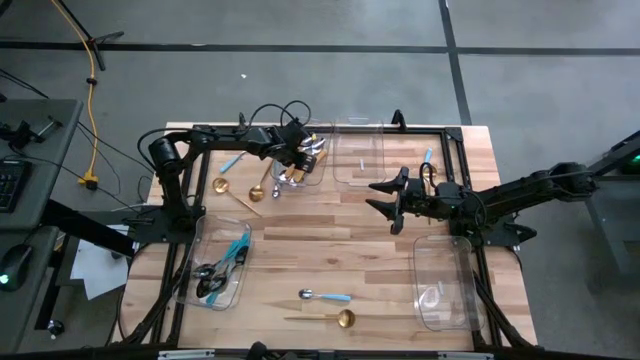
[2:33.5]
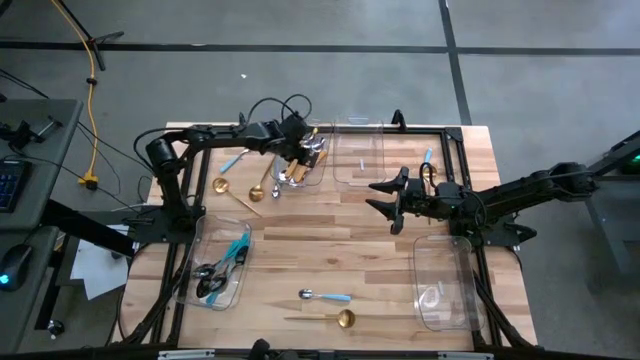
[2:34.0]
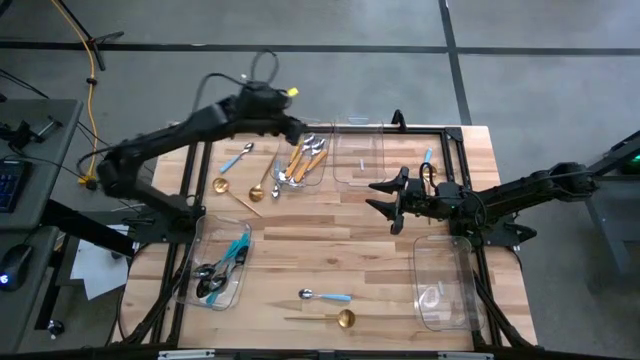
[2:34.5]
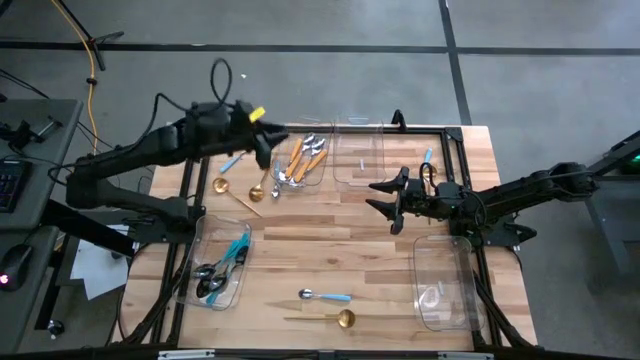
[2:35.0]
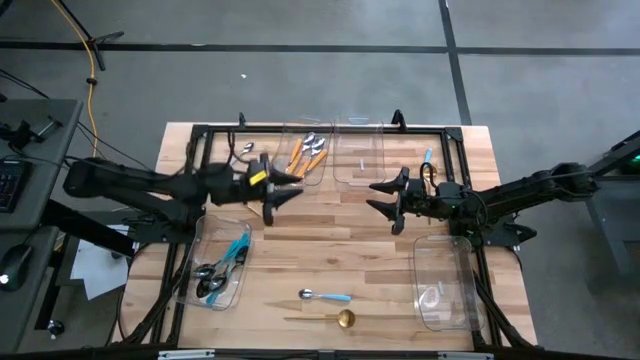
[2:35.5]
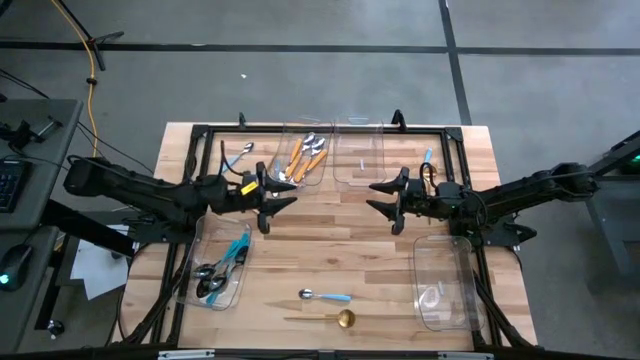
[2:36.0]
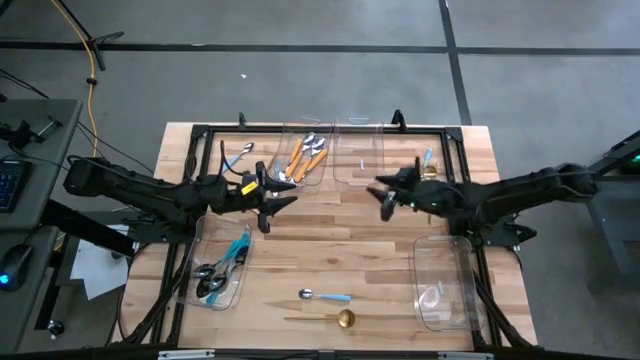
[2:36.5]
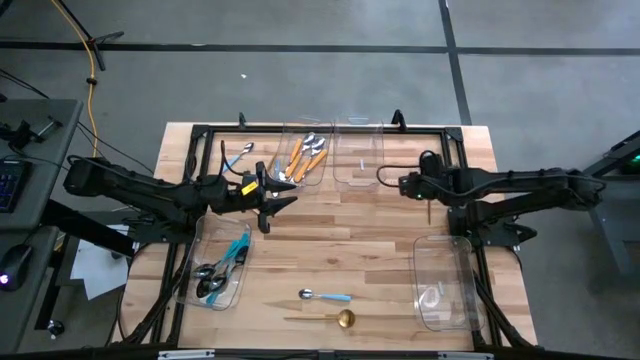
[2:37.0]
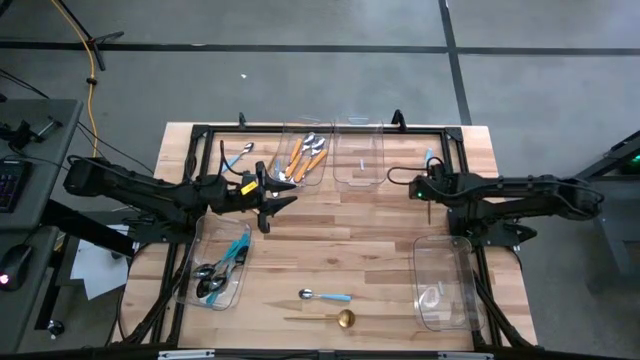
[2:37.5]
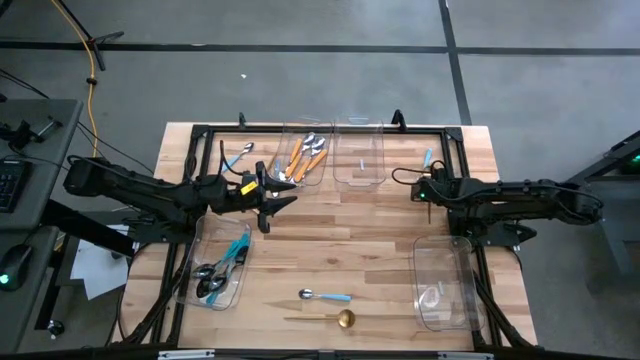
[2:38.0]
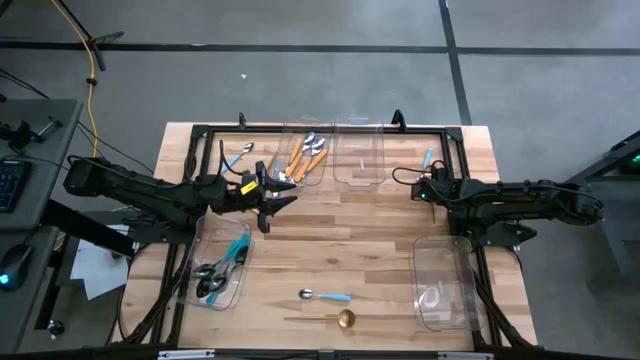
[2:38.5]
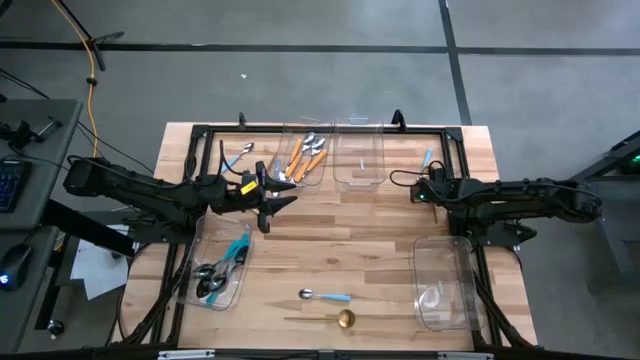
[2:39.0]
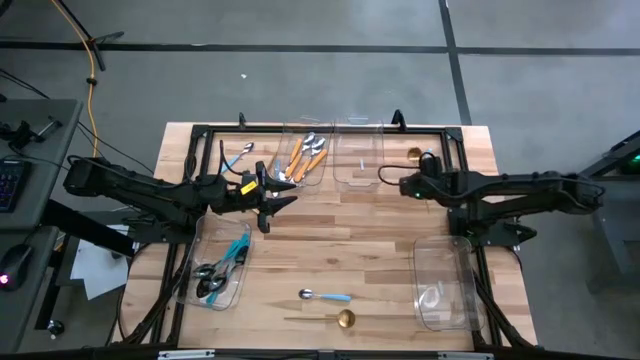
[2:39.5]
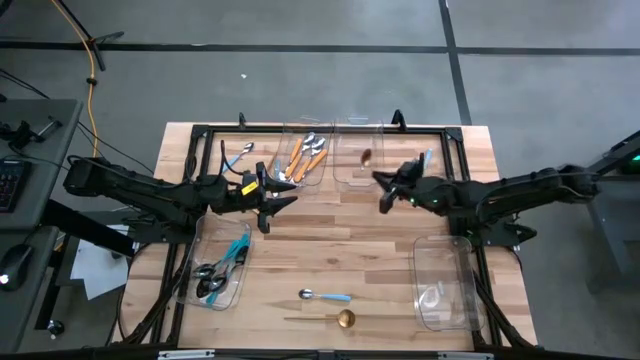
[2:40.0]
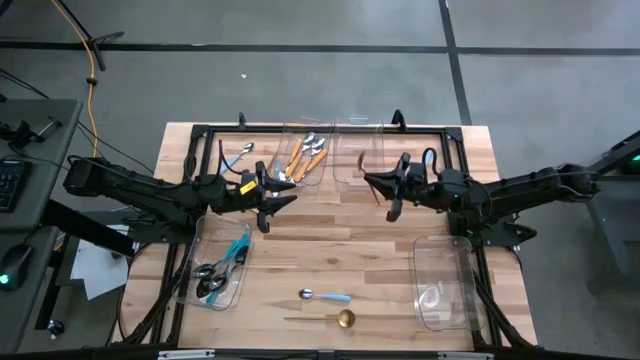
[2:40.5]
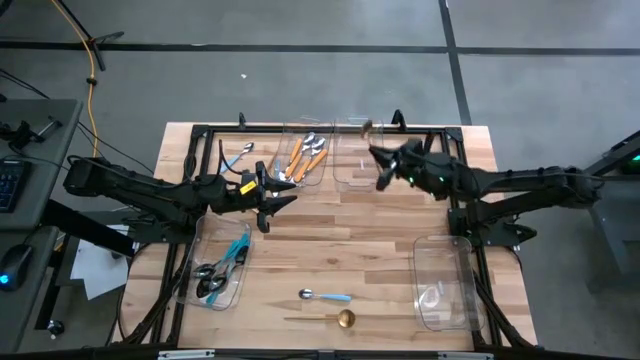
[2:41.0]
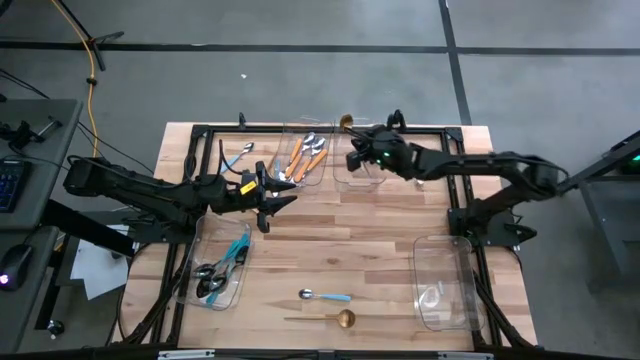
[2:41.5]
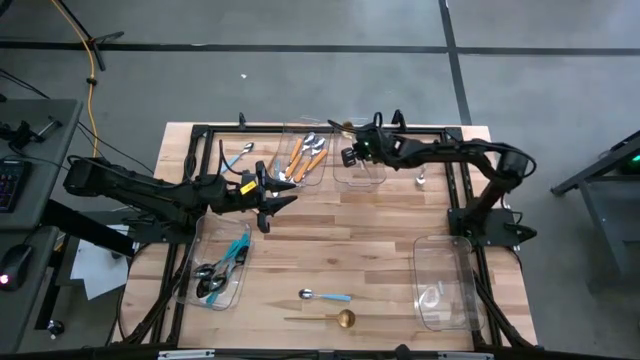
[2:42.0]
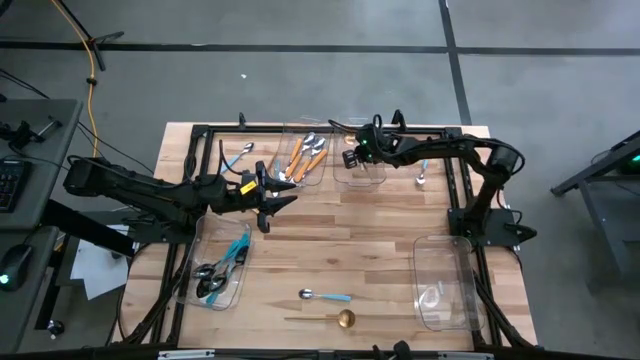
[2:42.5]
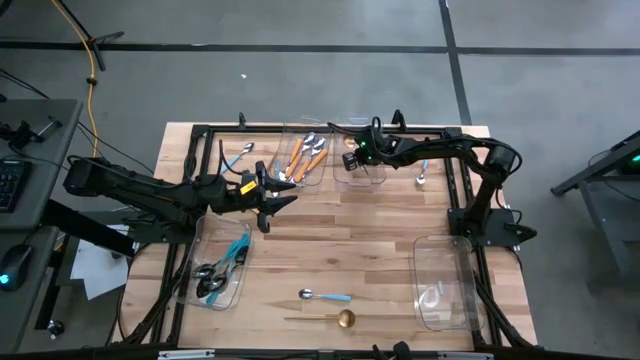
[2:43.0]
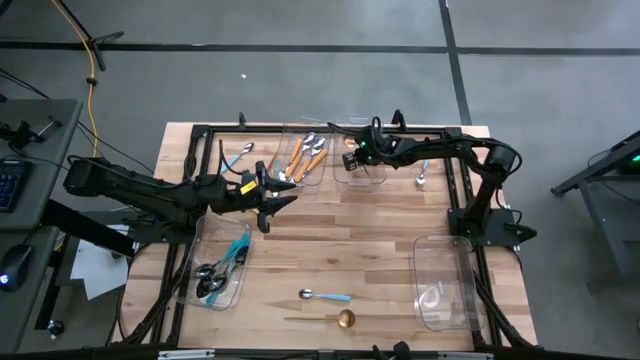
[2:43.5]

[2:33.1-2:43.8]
Task: Sort silverware by color (type)
Put the gold spoon into the top right transparent bin

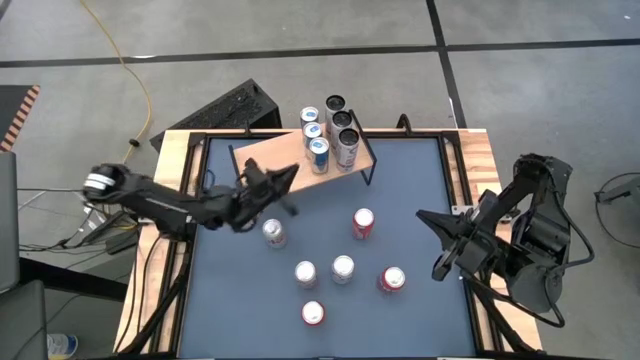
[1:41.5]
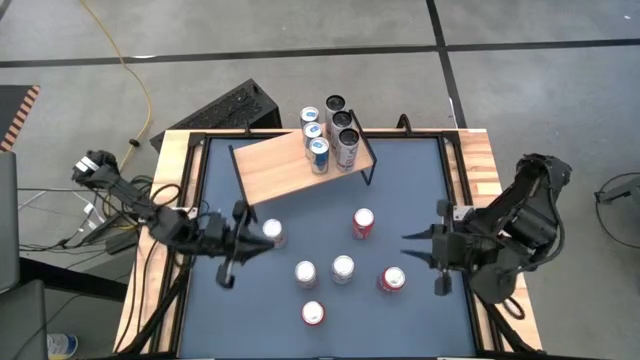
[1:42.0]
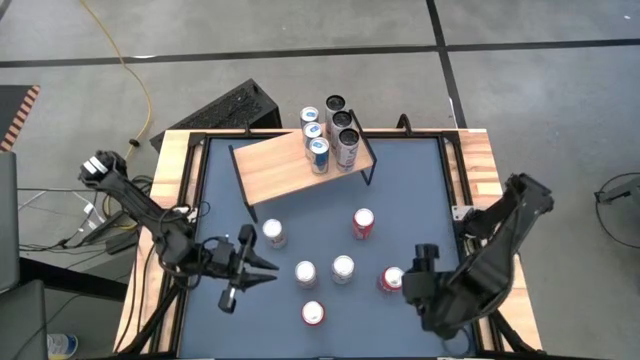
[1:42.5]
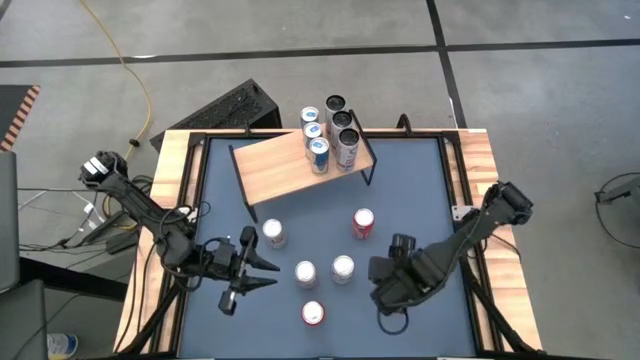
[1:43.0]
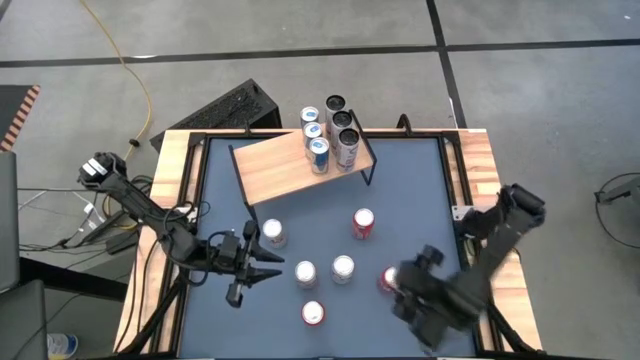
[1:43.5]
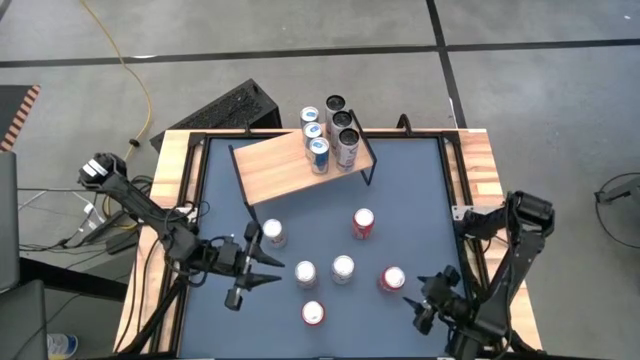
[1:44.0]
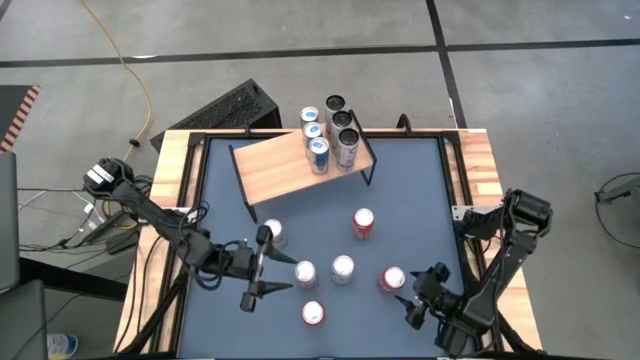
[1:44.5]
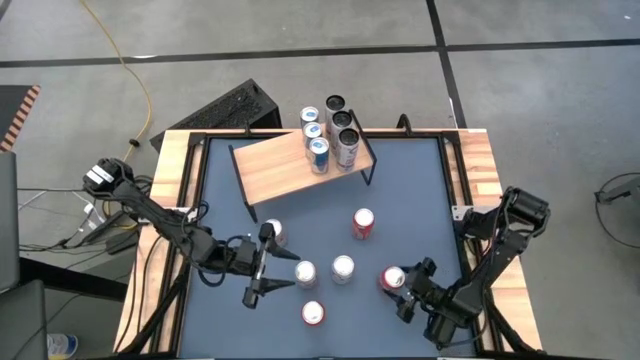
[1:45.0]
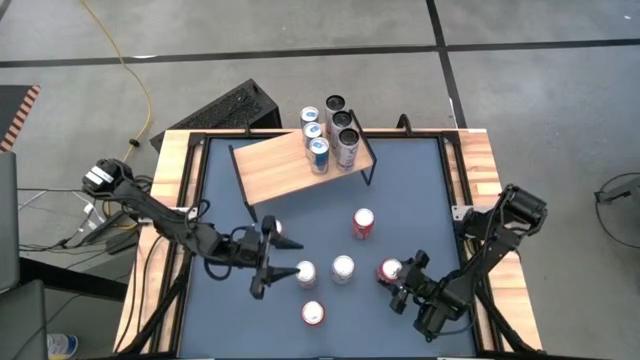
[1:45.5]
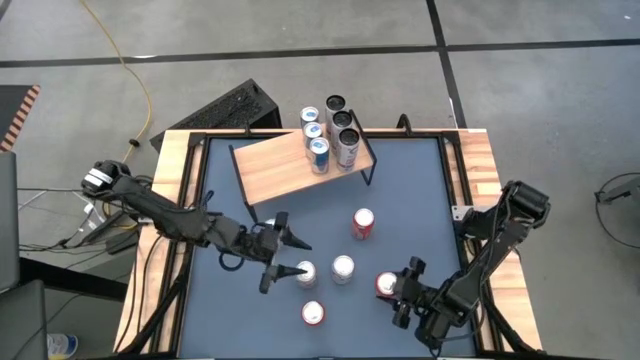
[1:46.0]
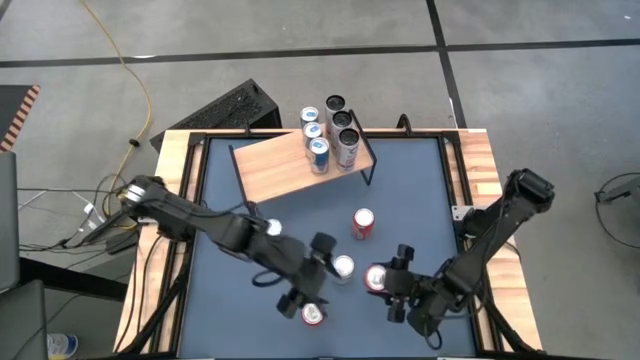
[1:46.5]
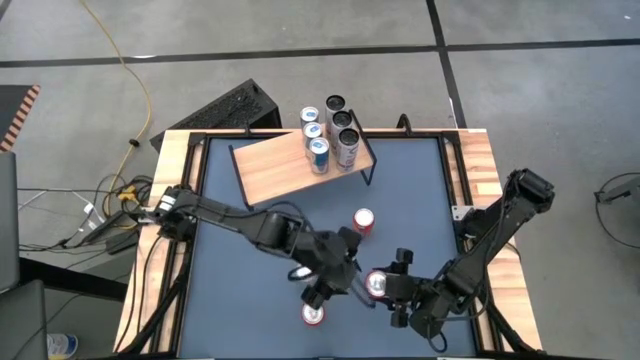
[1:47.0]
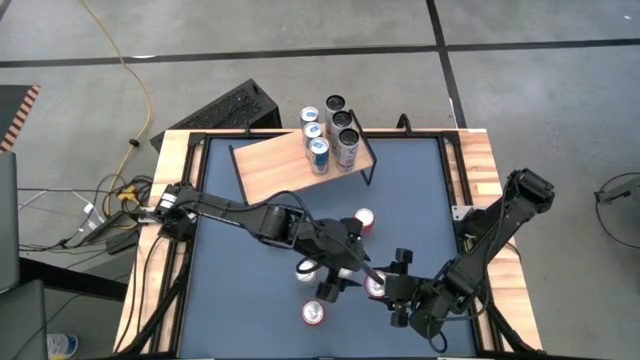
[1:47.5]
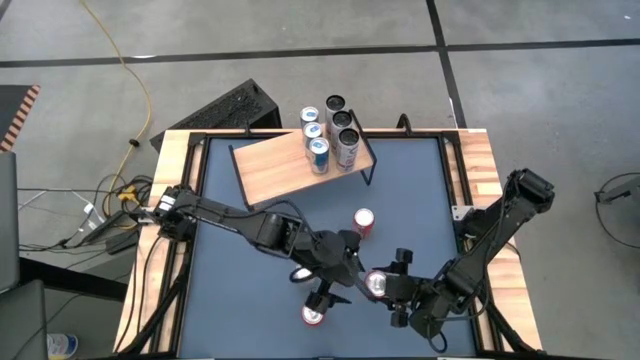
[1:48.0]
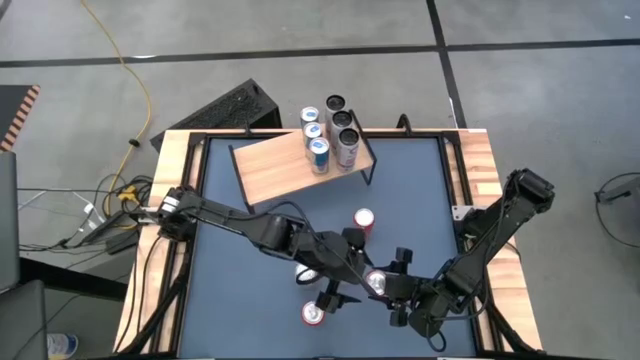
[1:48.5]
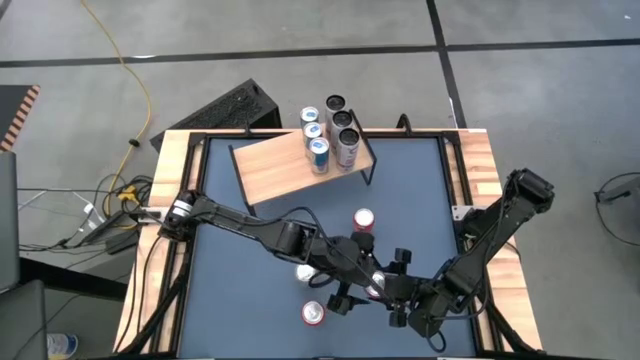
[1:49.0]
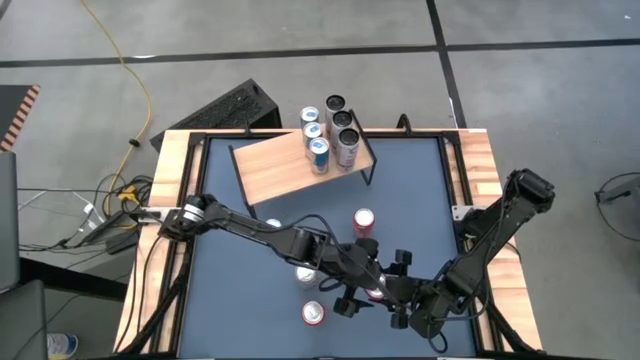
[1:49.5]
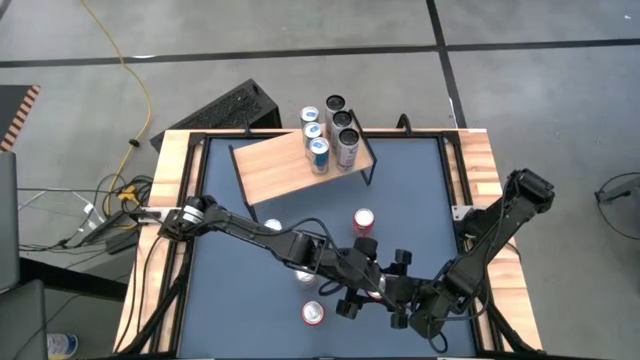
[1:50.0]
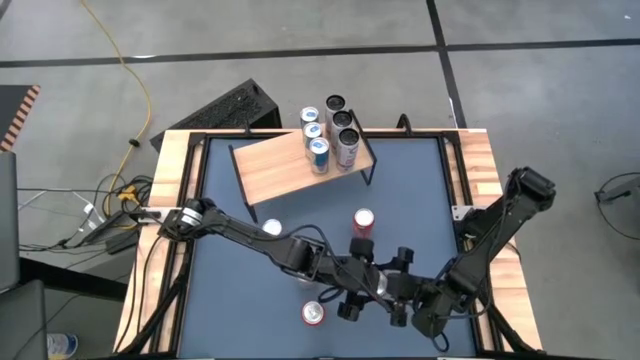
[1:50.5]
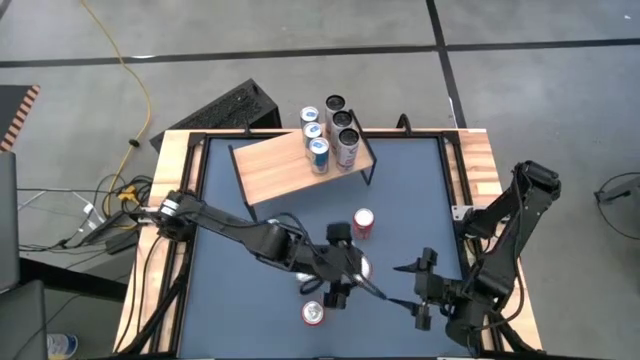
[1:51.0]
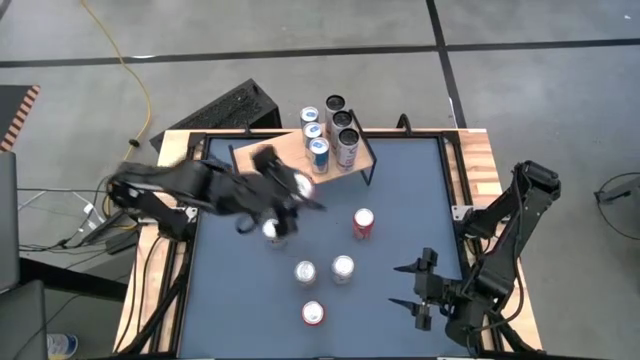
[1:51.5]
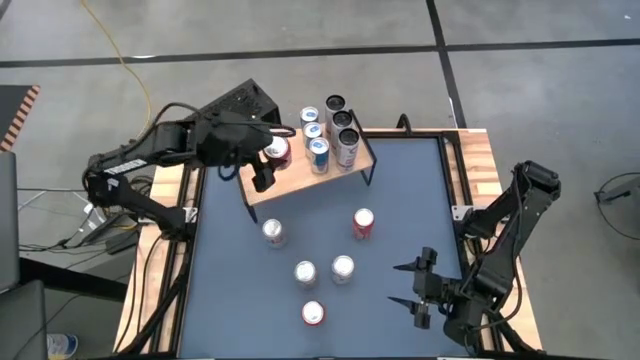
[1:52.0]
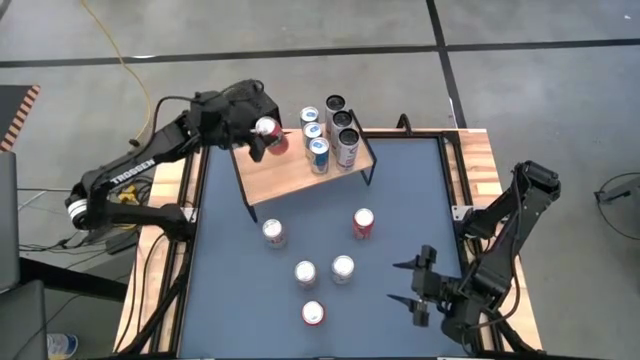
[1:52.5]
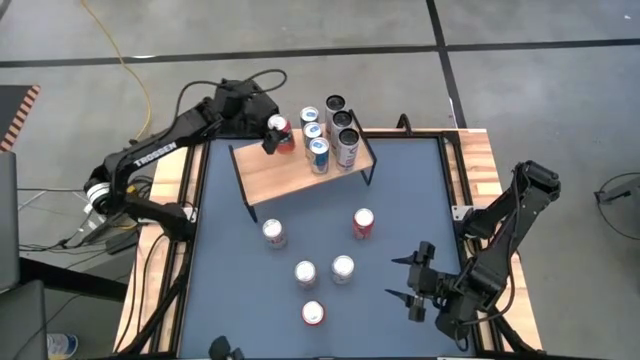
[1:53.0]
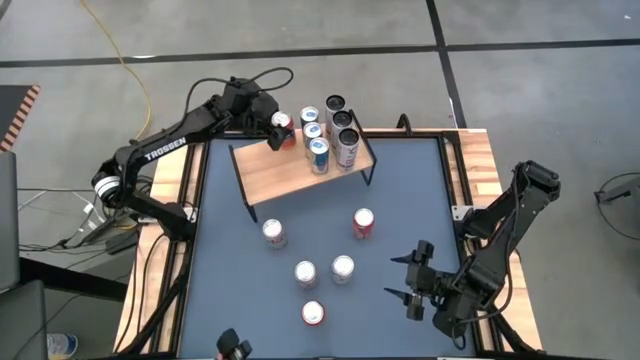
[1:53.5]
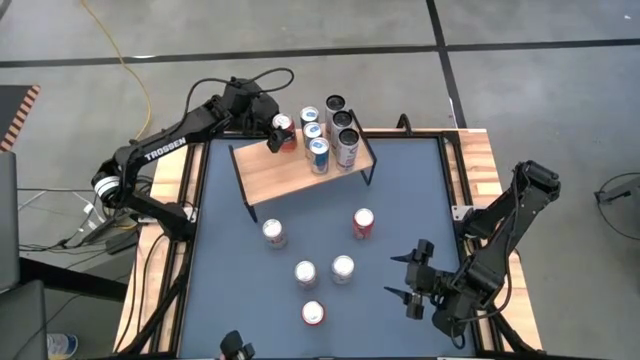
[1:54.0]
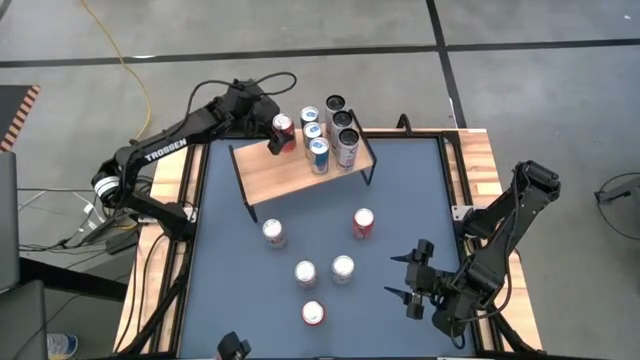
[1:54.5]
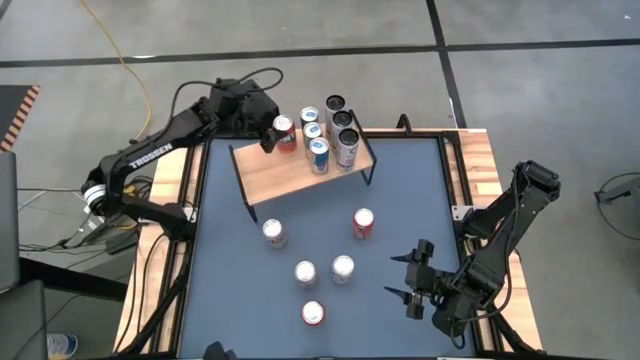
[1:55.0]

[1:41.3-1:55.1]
Task: Place canned beverage on shelf
Put the bottom right red soda can on the shelf
